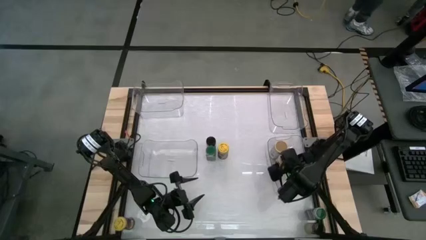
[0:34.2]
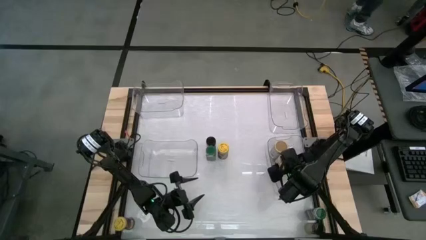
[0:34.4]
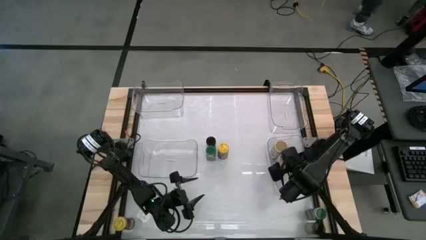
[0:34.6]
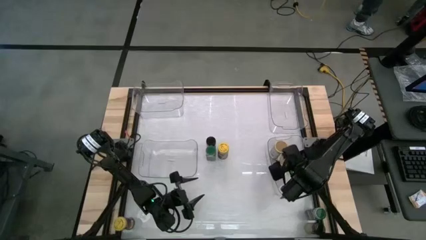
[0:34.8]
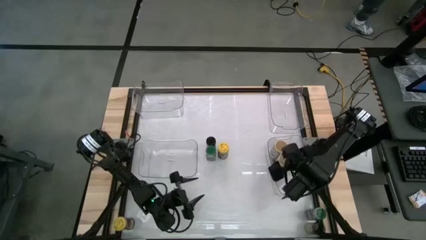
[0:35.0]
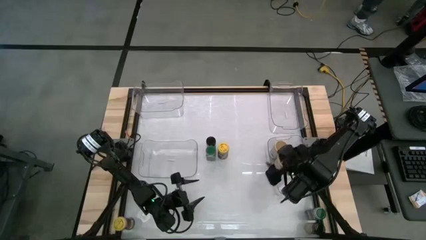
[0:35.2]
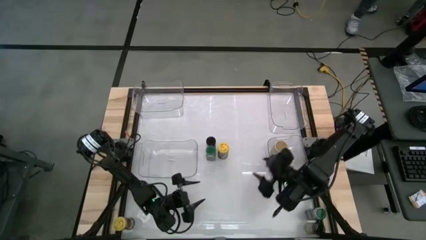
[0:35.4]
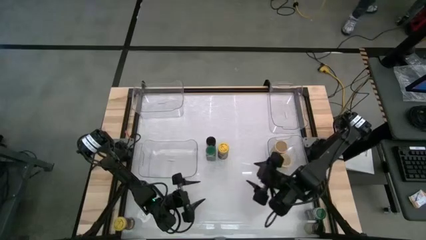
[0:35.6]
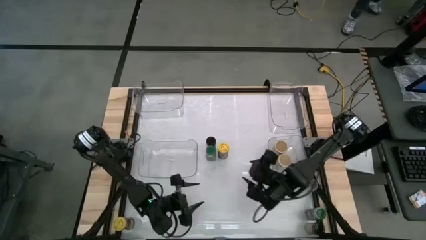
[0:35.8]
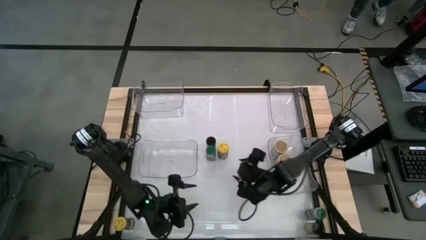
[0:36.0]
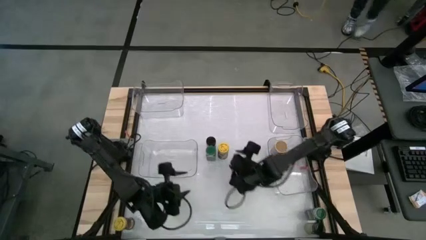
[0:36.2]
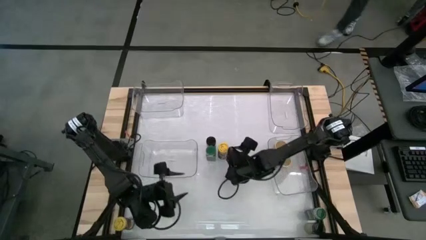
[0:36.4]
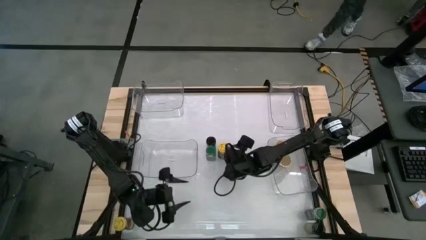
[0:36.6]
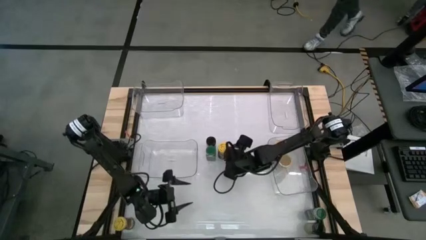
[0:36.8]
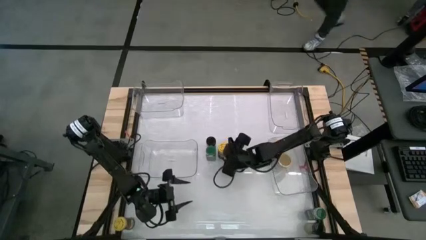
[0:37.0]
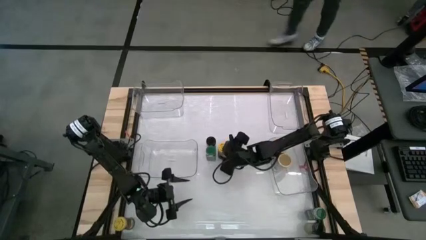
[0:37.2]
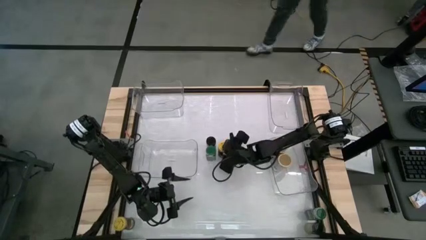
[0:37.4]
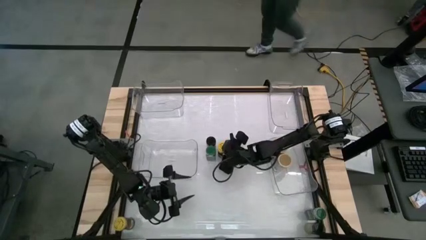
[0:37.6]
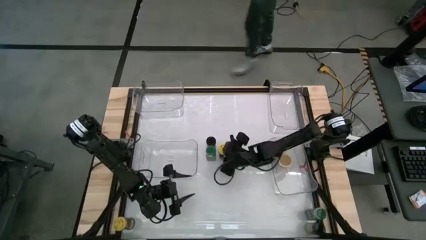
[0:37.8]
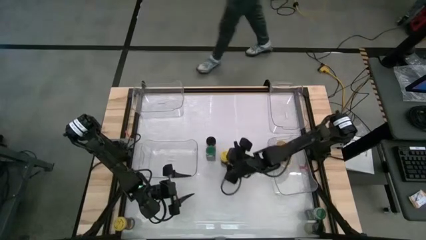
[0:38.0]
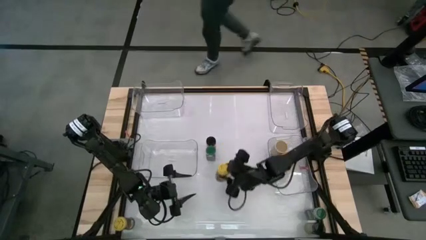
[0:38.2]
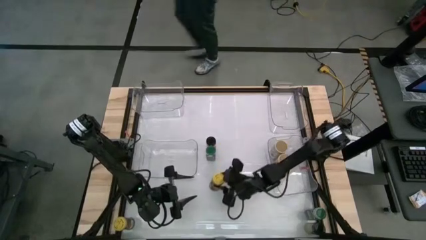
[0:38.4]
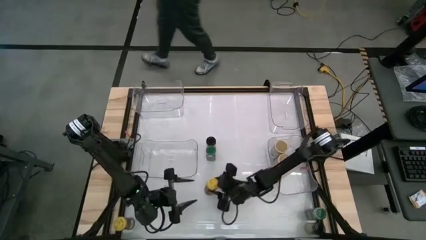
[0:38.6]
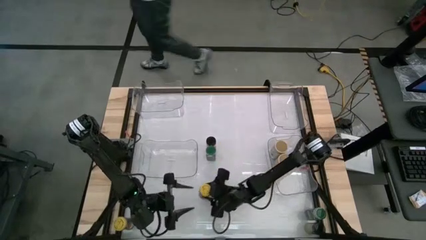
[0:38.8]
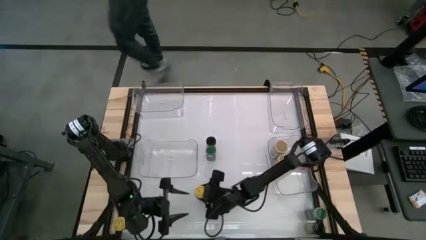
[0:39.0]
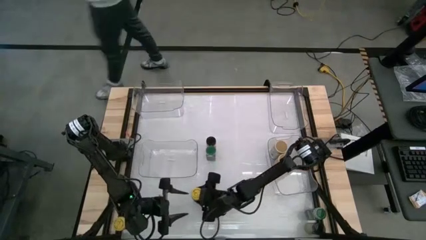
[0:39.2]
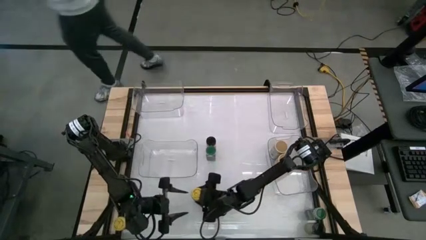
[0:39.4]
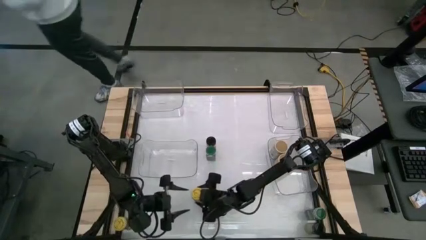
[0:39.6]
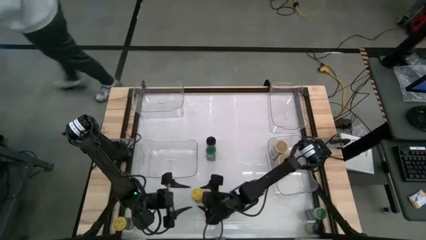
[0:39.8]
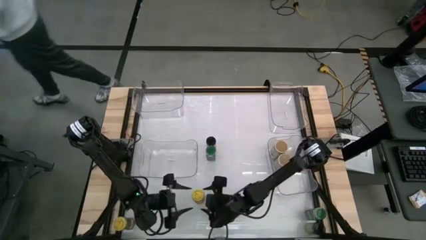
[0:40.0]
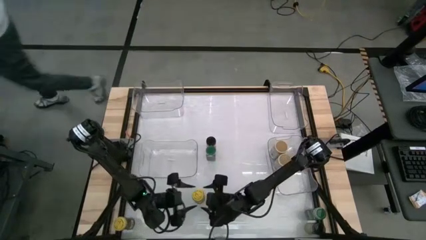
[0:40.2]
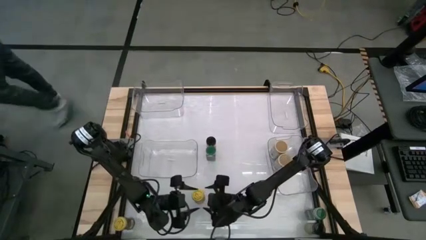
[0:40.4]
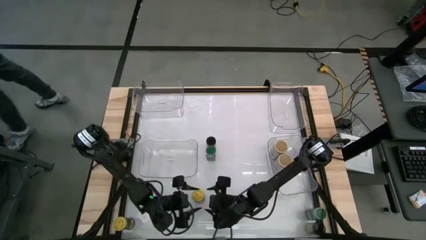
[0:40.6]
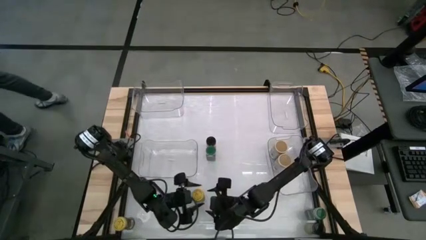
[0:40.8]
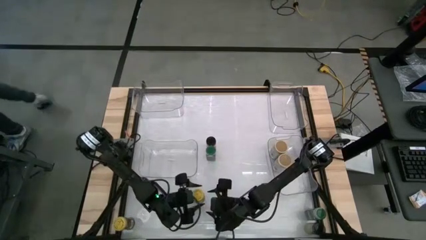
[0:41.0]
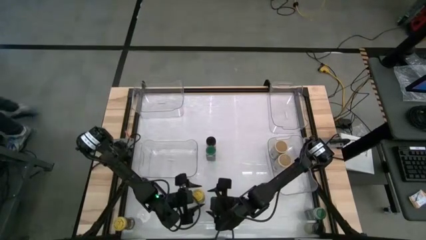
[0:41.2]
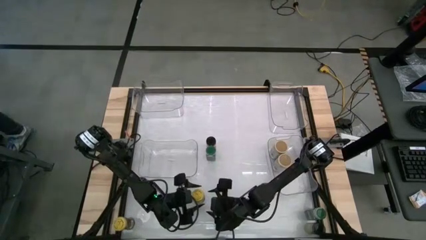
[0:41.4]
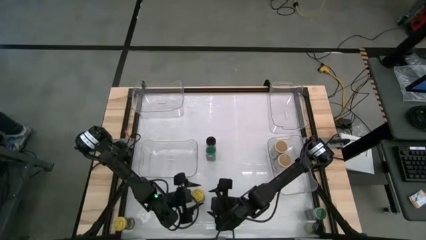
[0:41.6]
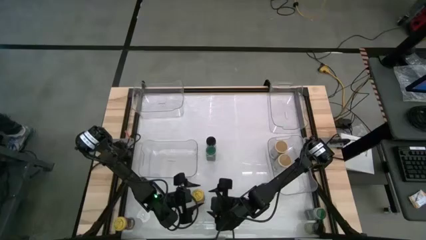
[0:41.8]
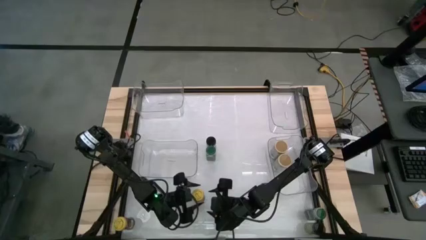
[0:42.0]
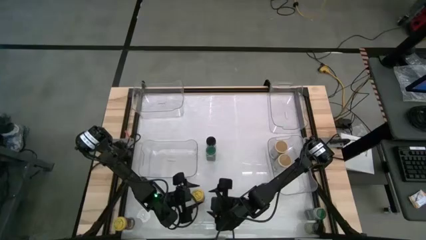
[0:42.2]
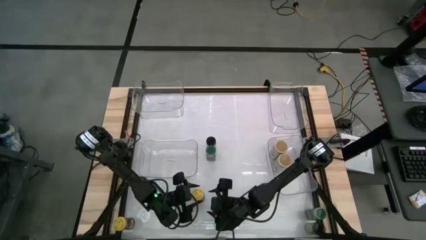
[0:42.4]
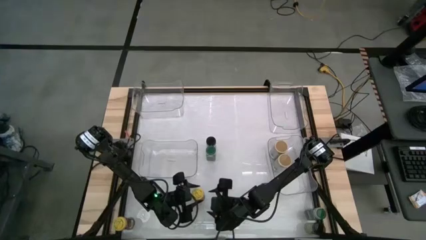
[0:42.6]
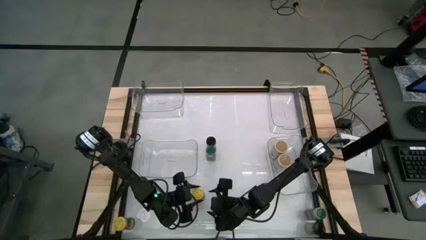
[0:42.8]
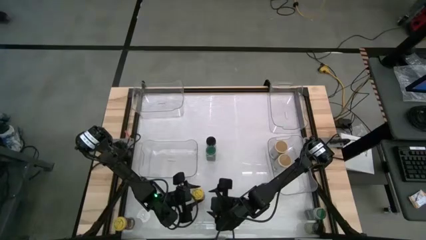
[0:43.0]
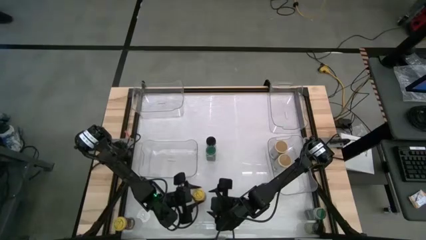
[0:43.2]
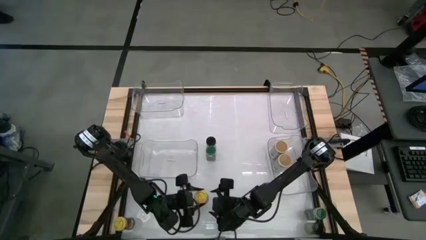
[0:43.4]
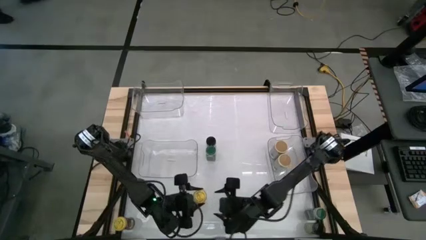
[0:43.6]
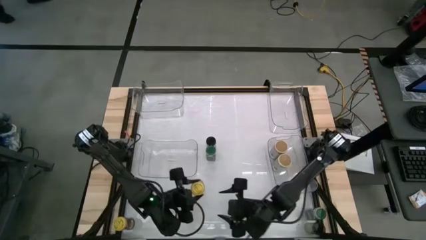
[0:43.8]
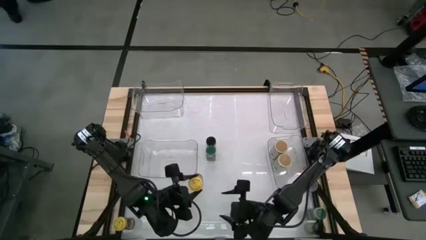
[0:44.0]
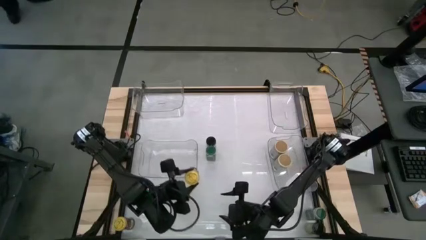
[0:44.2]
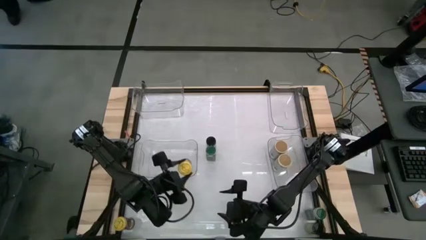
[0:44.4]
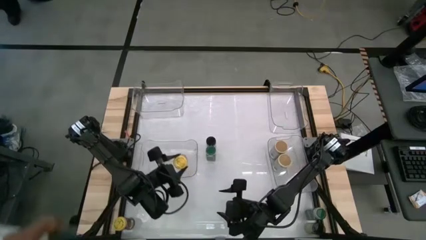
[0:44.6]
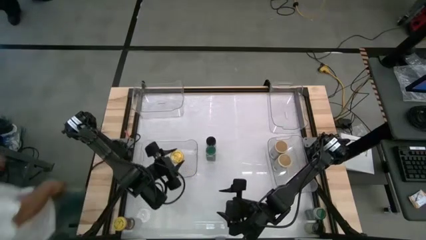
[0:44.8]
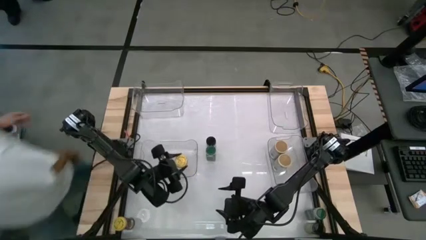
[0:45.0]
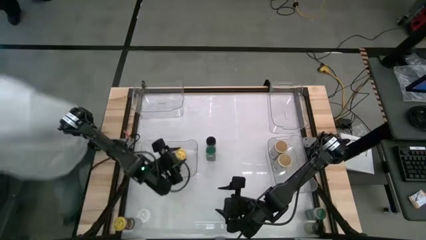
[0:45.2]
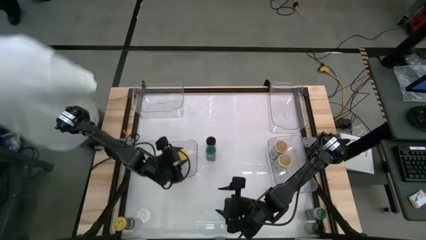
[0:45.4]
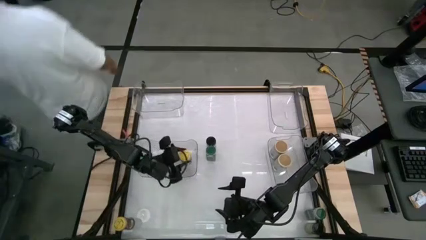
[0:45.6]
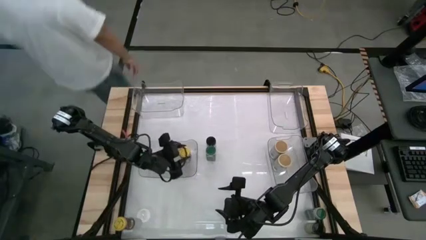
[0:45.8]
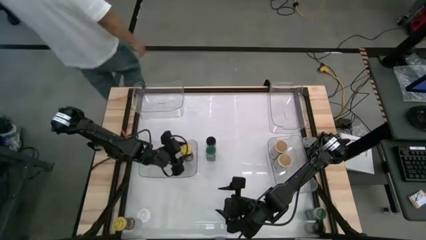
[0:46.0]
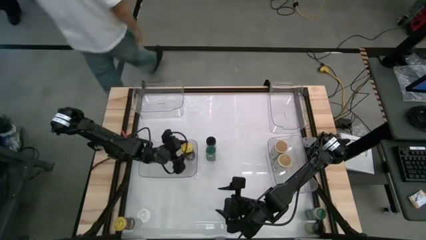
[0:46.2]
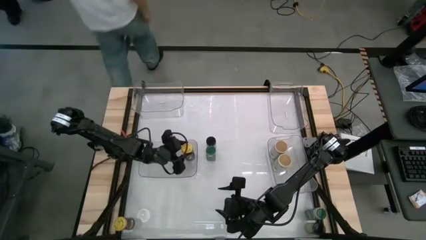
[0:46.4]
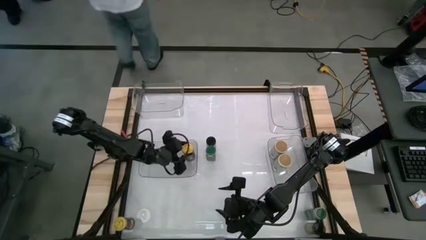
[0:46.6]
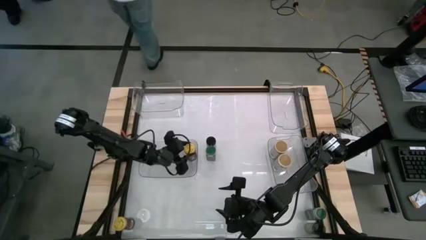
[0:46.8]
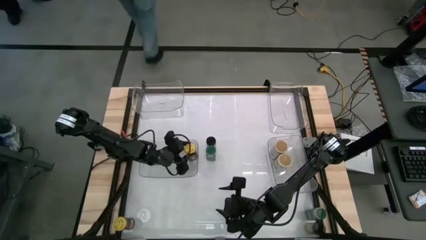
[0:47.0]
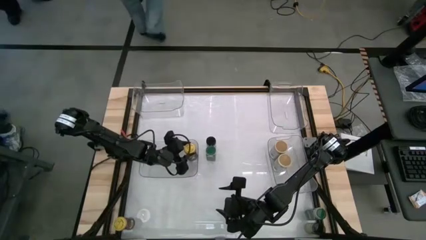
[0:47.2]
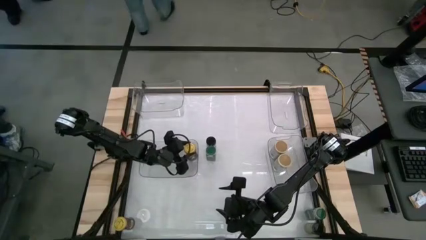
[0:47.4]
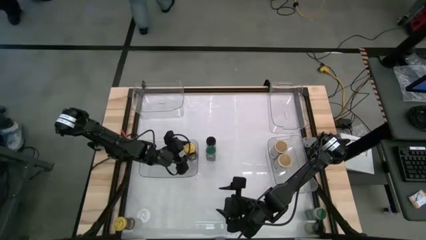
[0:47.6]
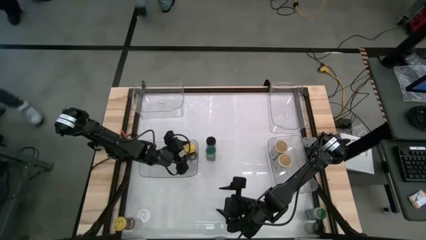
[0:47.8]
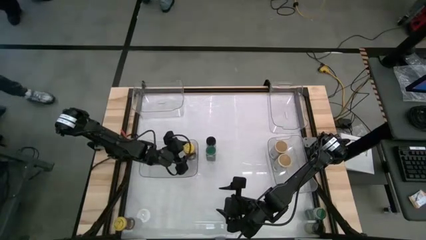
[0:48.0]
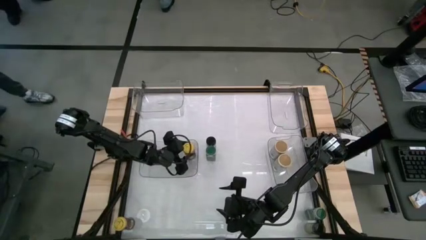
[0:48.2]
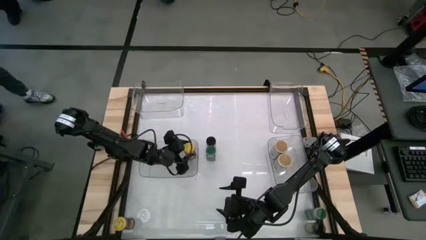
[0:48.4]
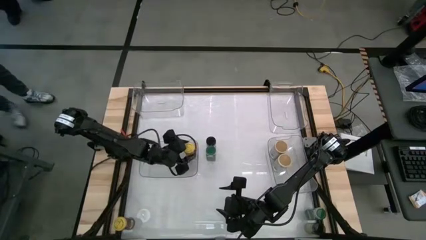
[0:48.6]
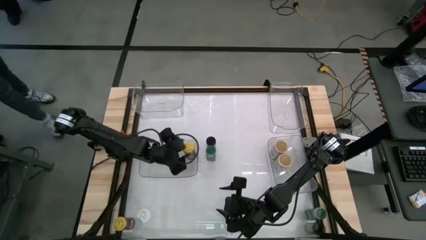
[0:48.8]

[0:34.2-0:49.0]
Task: Sort spices by type
Put the top yellow spice bottle into the bottom left transparent bin

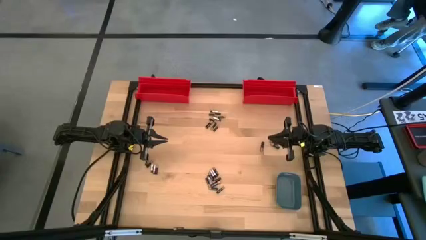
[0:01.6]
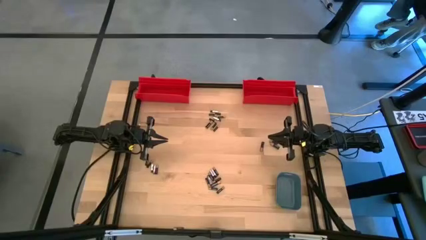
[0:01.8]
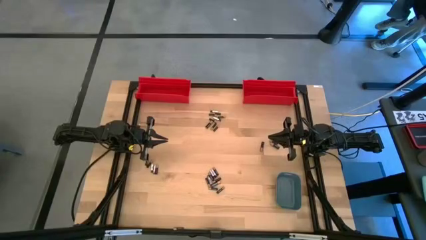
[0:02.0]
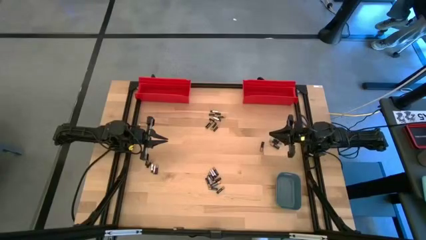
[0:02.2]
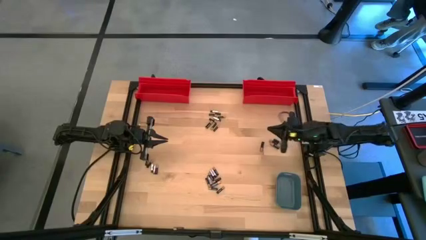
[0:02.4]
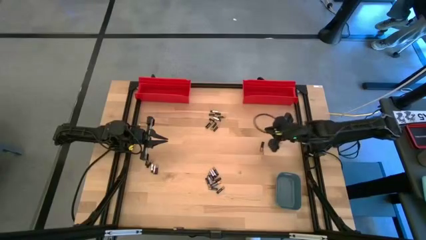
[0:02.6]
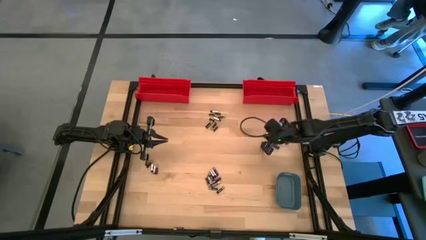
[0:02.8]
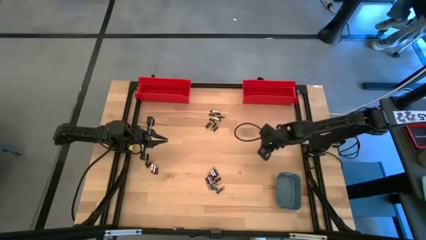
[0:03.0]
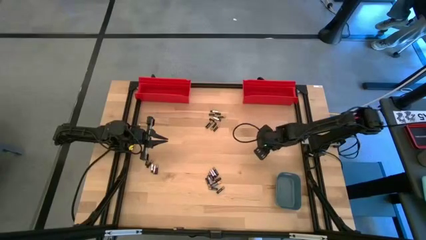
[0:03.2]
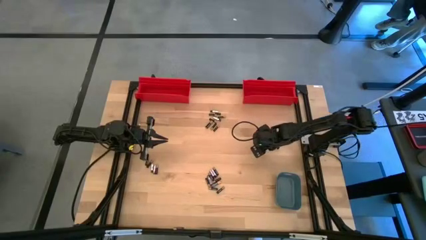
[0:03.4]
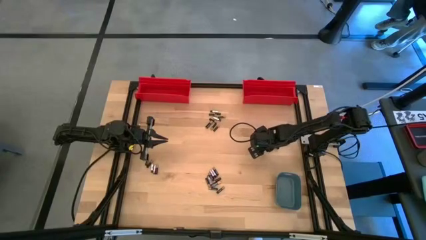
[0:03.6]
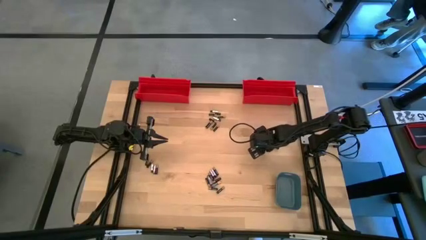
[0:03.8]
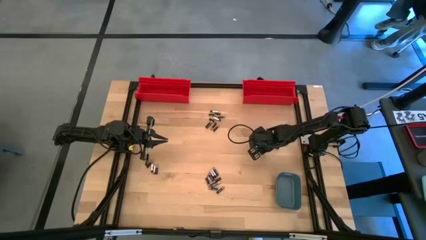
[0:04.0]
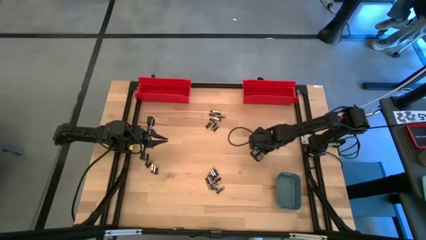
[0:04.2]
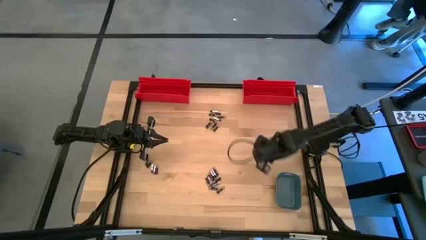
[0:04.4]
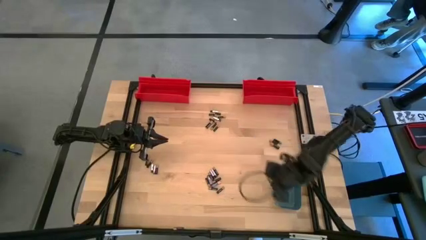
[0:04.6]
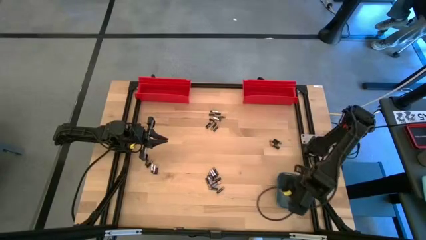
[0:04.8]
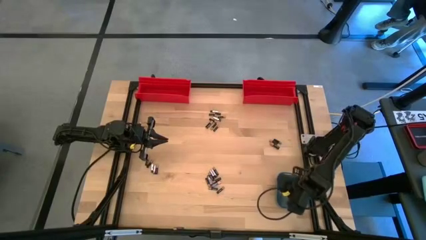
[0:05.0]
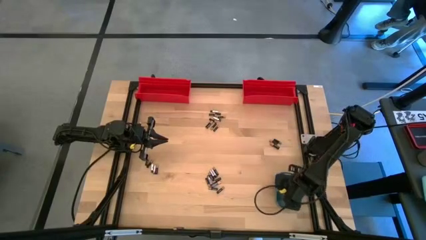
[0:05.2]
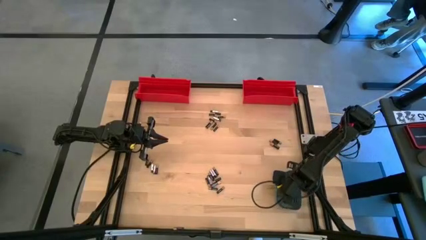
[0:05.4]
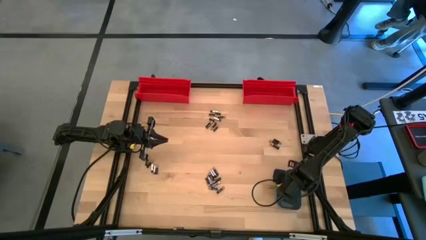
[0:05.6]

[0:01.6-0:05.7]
Task: Sort batteries
Put the large black battery into the blue bin
